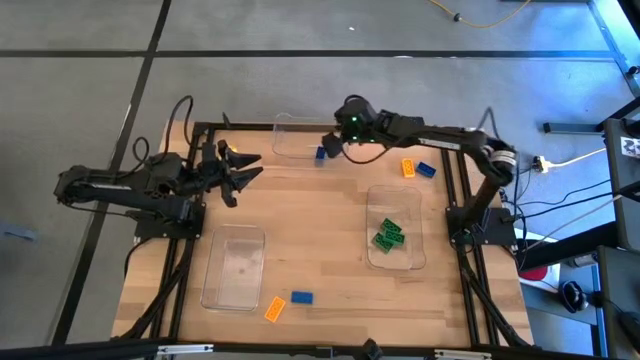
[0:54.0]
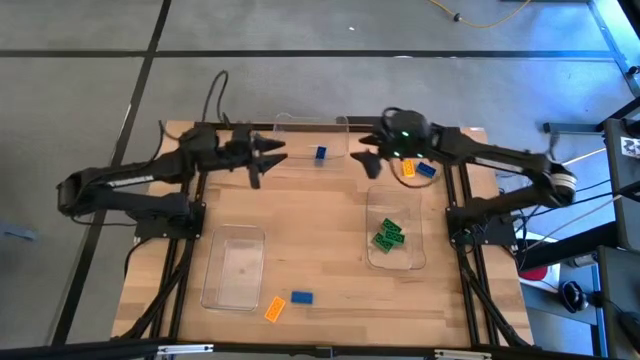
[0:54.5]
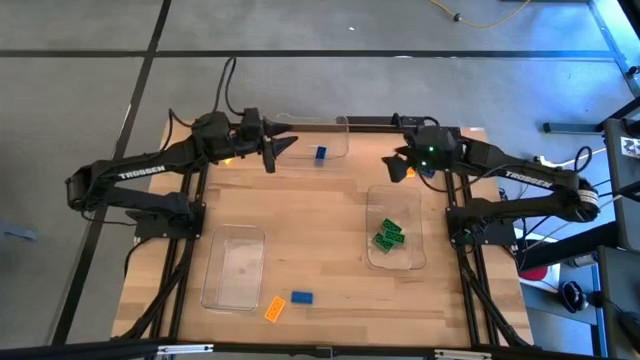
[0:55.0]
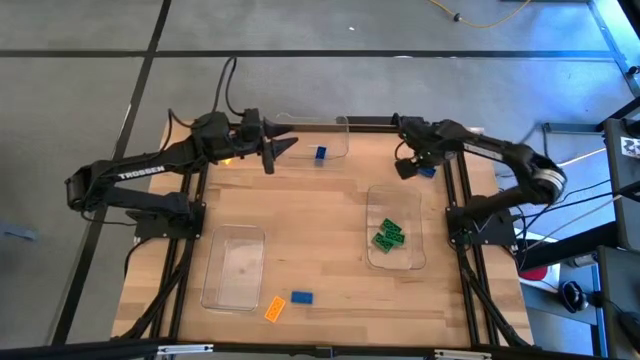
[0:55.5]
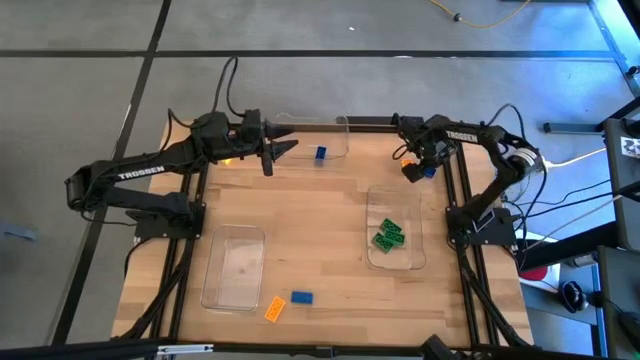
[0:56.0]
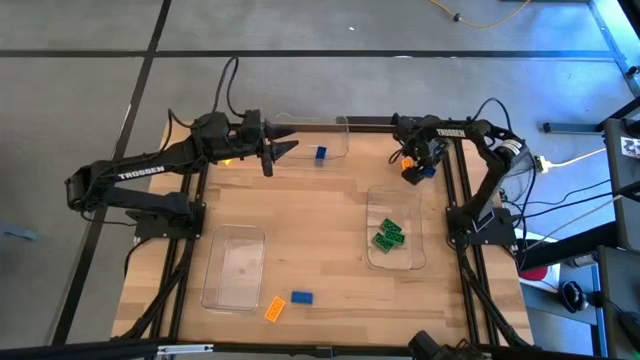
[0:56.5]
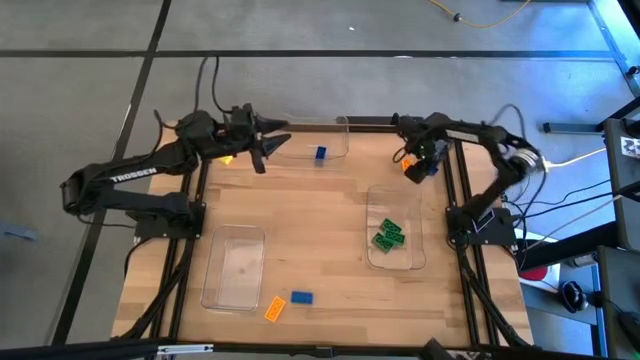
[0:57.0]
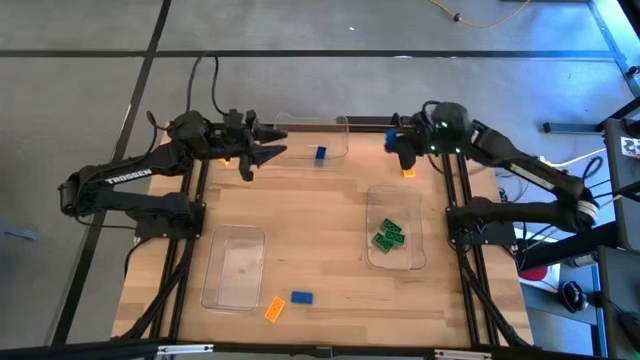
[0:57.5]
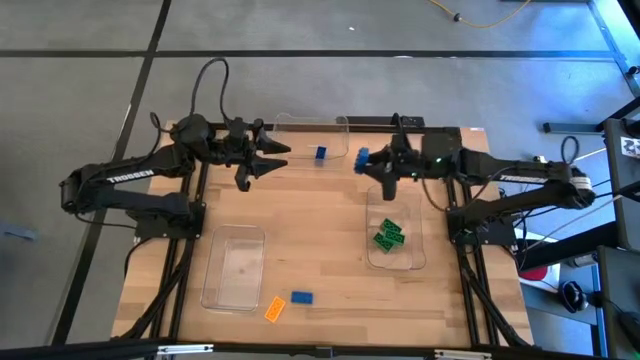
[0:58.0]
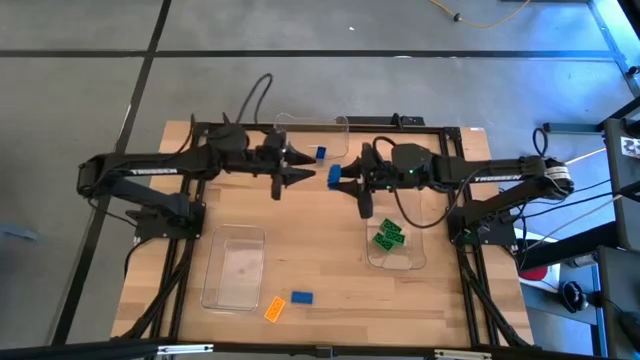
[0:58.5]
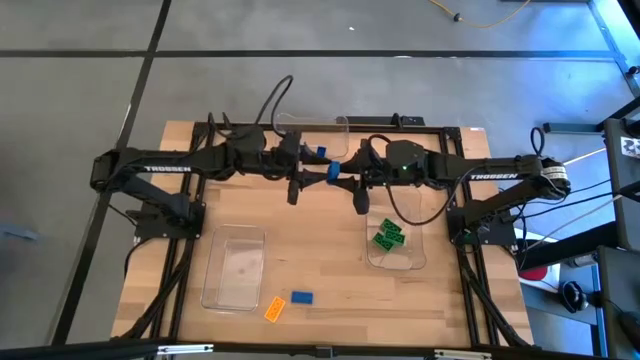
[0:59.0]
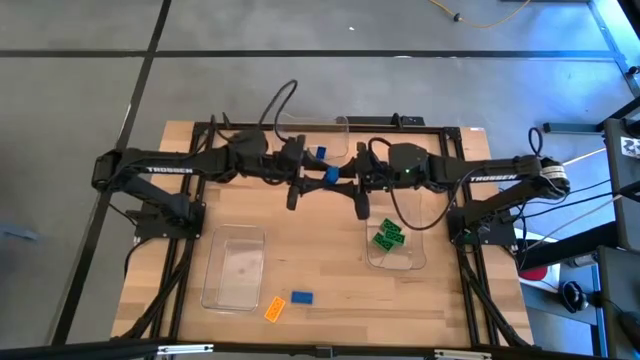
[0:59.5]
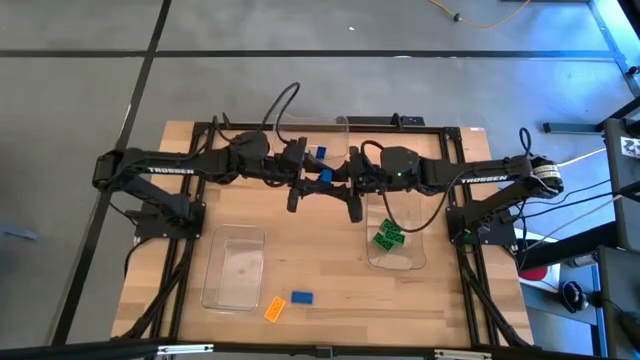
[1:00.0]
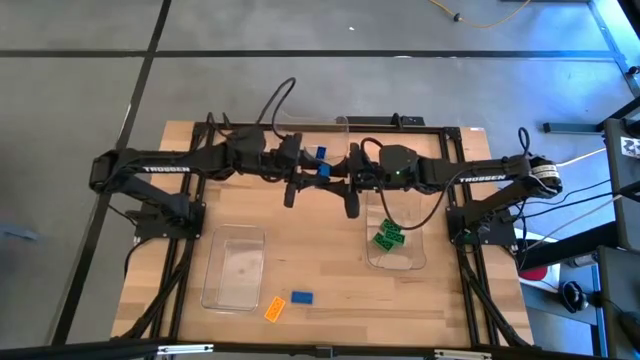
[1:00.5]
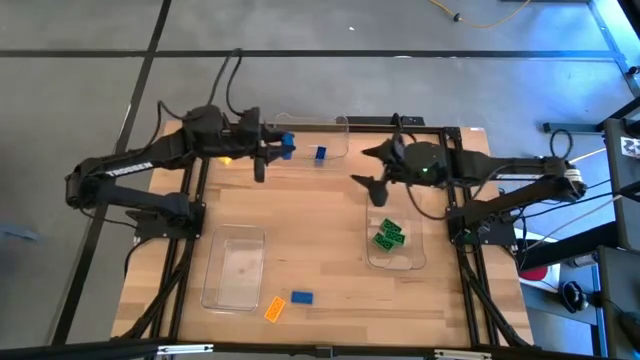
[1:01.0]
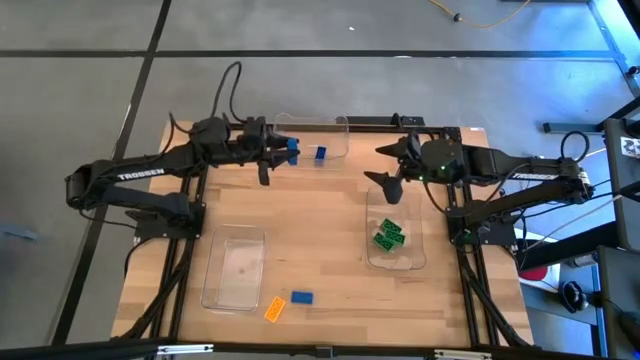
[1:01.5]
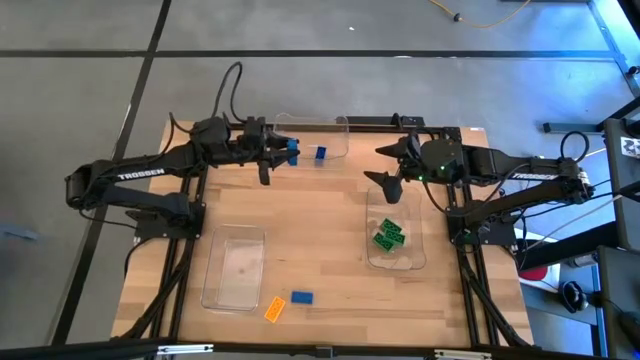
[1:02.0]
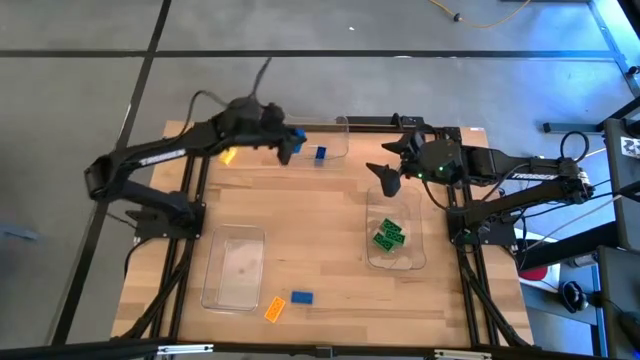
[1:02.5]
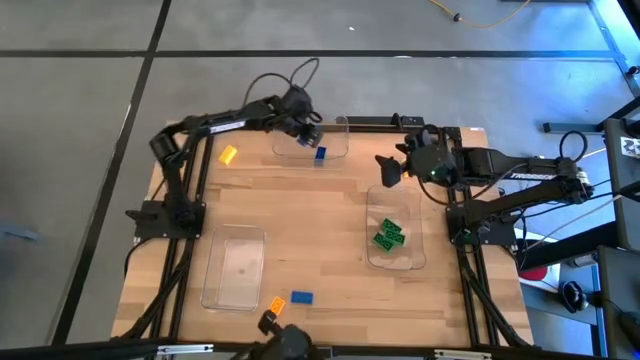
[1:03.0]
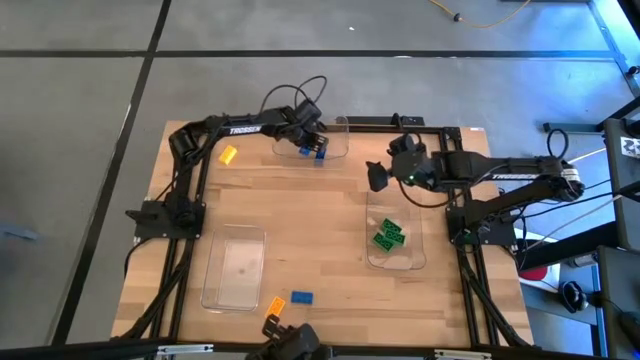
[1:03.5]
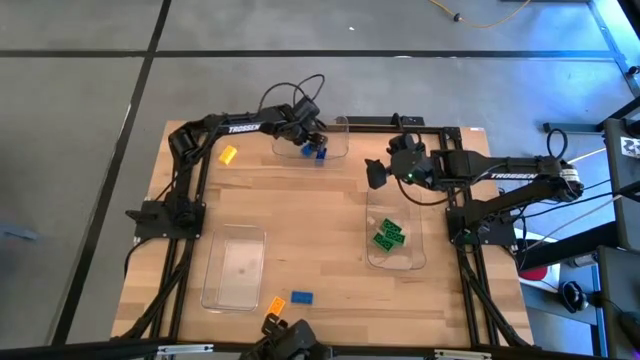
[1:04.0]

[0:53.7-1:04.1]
Task: Sort & place blocks by color
Put the top blue block into the top center transparent bin

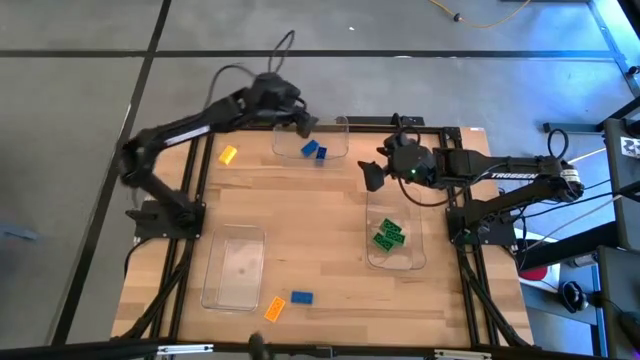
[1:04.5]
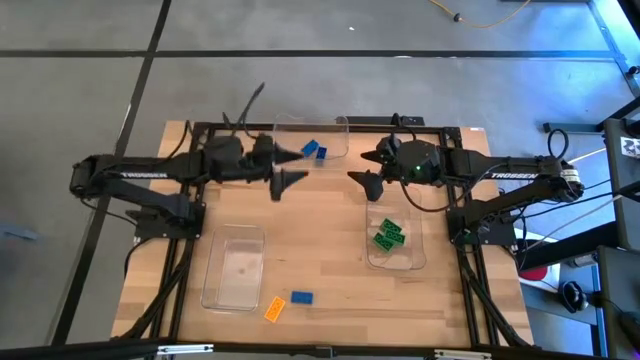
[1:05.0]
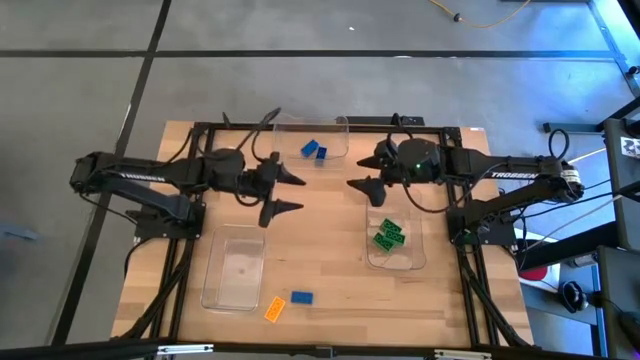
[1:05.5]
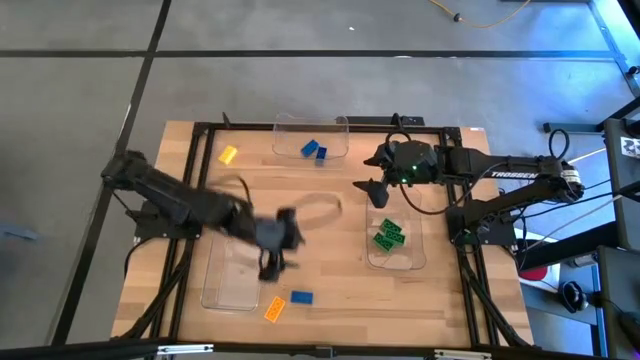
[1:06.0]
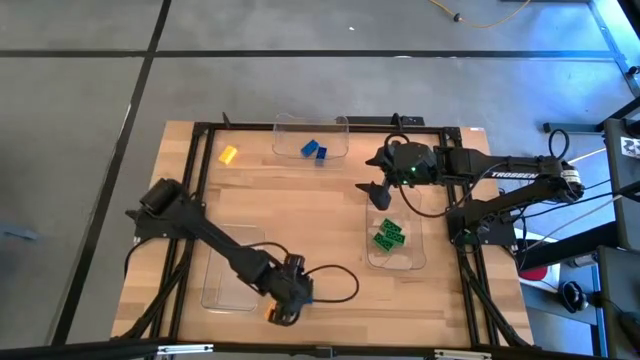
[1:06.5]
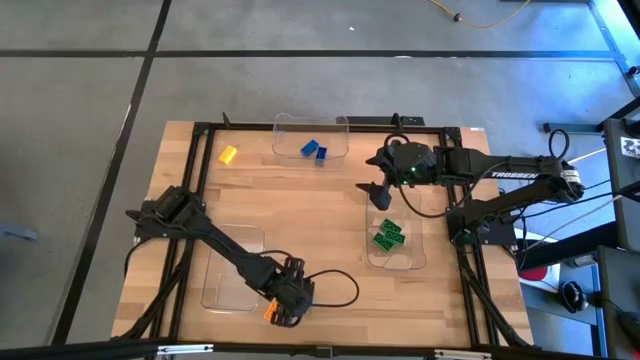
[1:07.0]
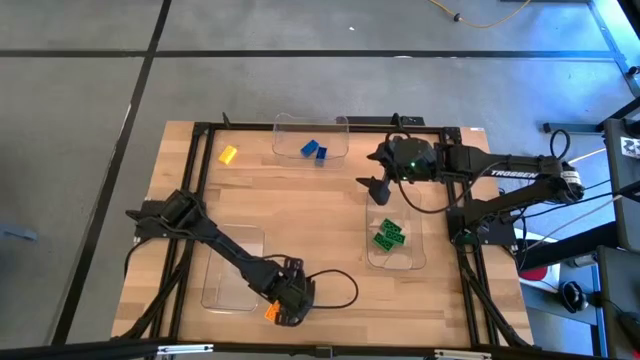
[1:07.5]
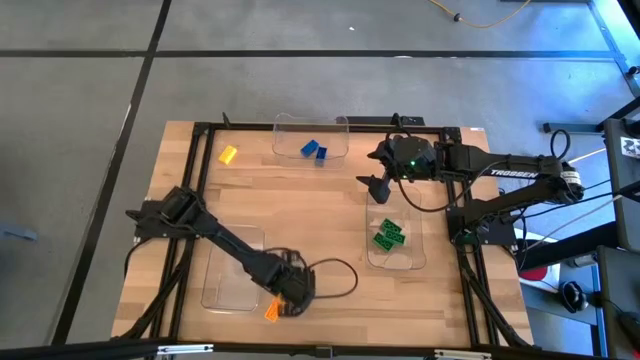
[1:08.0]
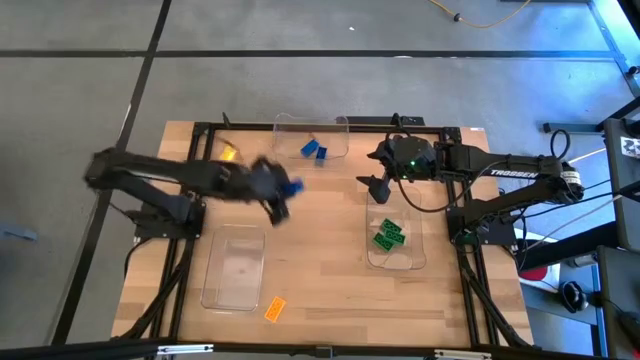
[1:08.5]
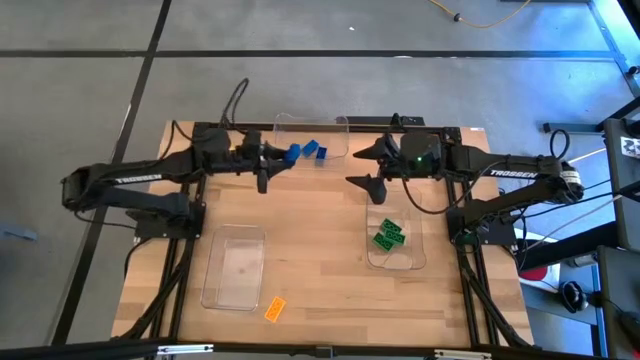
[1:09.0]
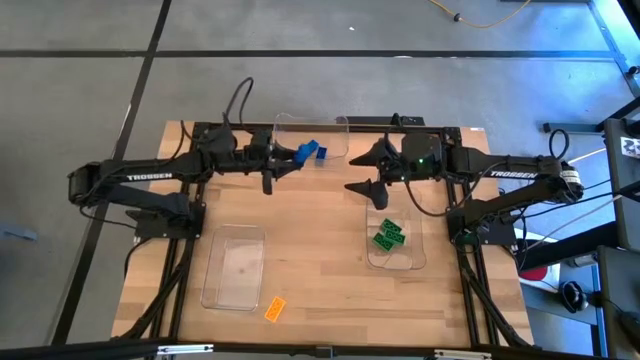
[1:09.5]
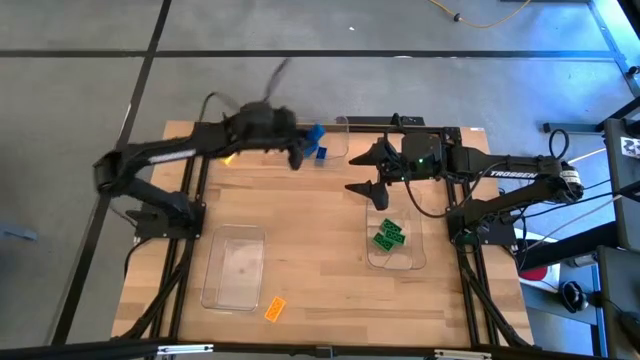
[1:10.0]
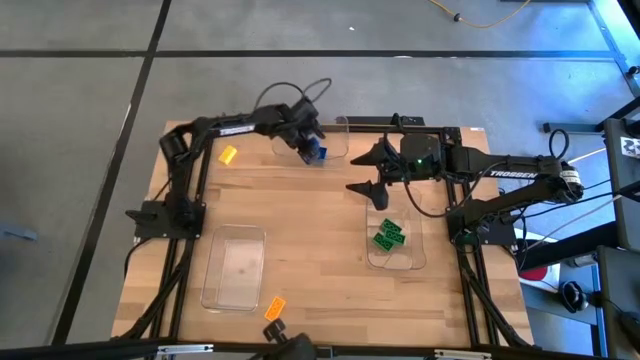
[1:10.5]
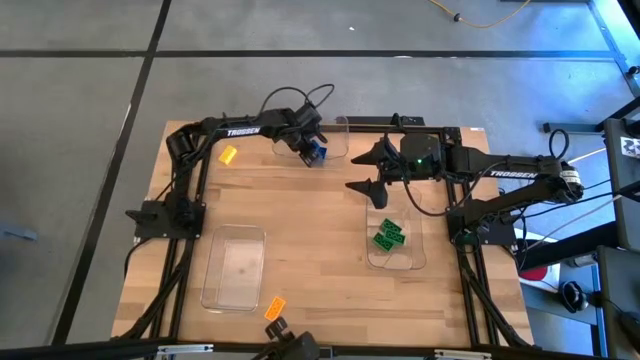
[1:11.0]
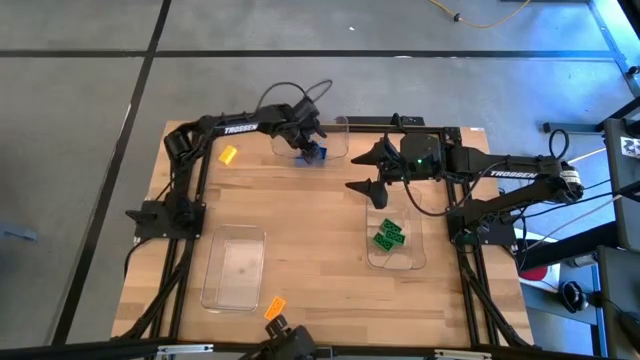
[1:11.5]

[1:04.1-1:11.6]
Put the blue block into the top center transparent bin

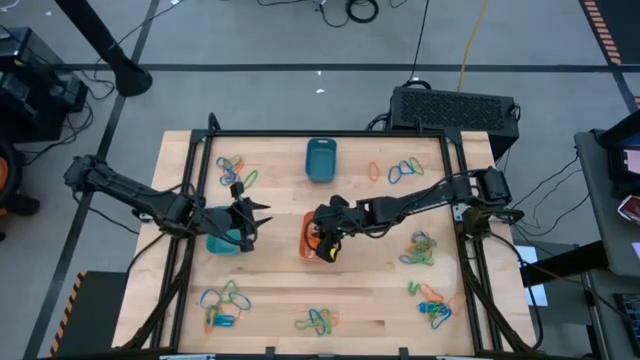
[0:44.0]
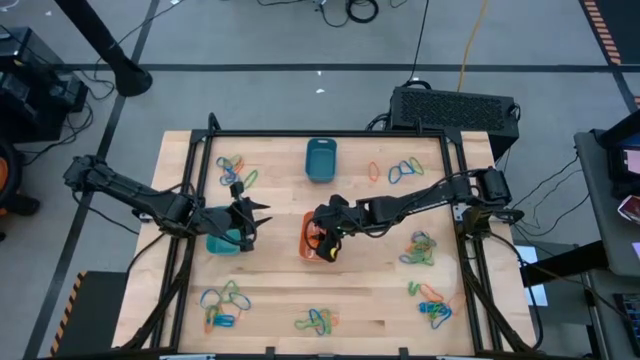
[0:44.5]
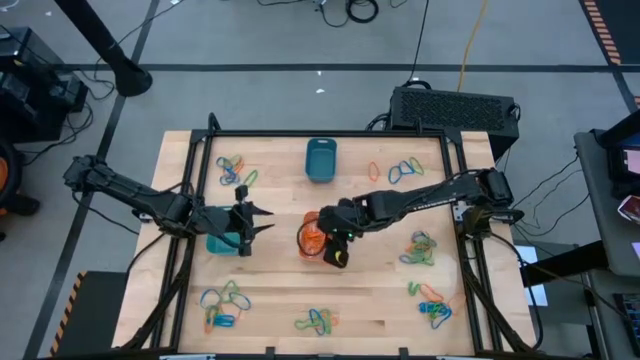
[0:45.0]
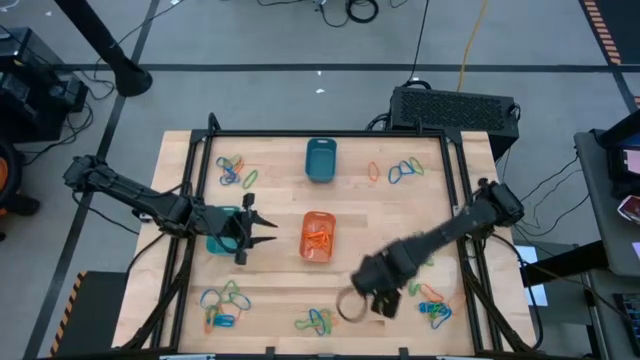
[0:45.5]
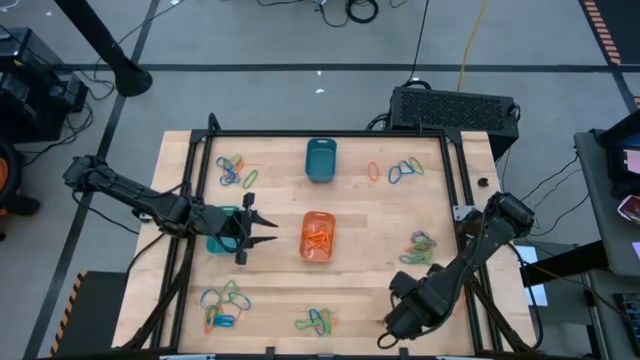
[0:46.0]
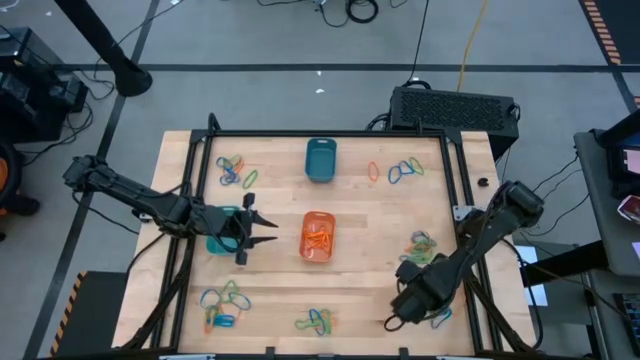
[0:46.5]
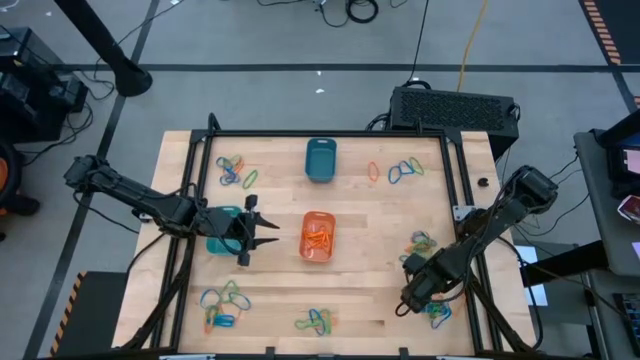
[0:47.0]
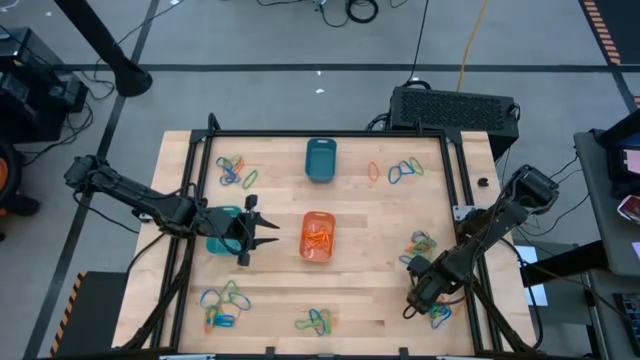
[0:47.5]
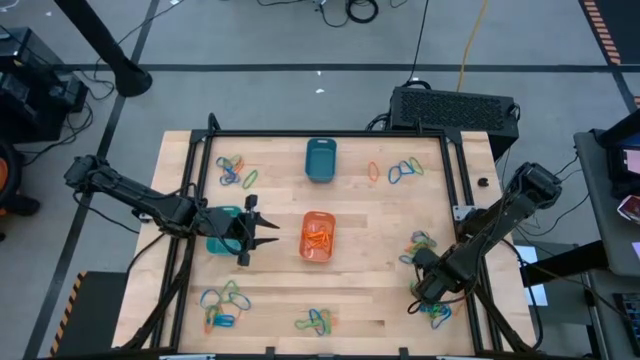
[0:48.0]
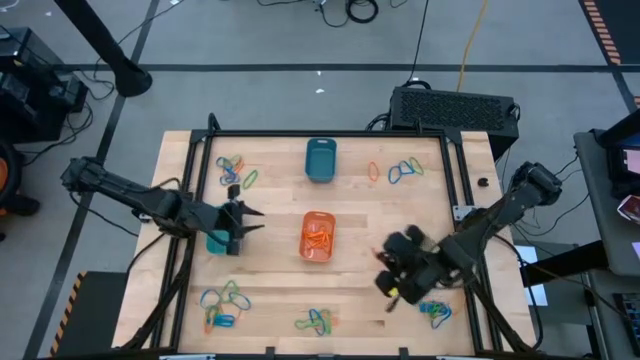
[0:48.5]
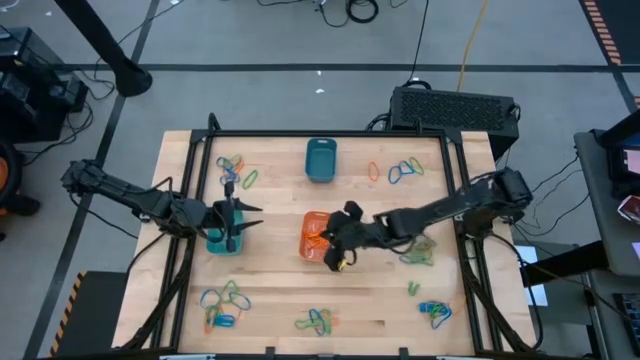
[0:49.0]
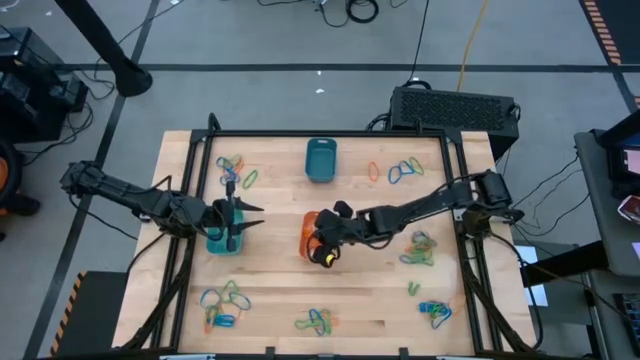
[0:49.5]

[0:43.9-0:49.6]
Task: Sort rubber bands into baskets
Put the orange rubber band into the orange bin
